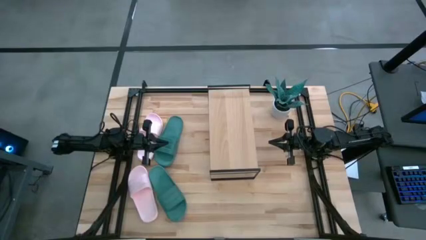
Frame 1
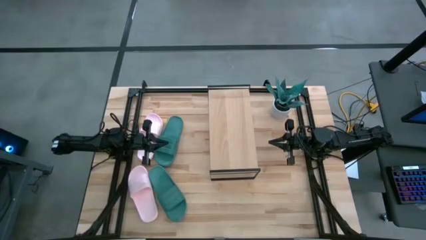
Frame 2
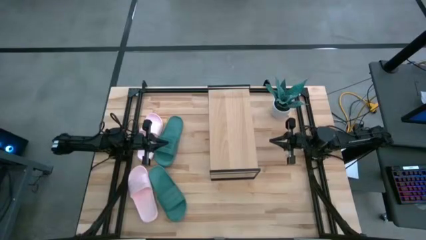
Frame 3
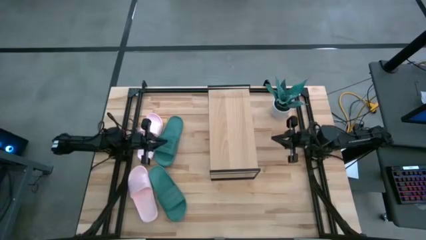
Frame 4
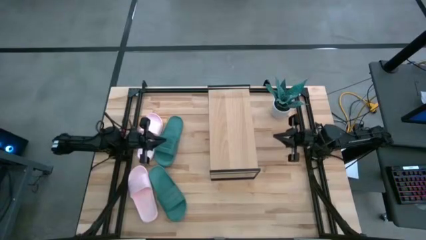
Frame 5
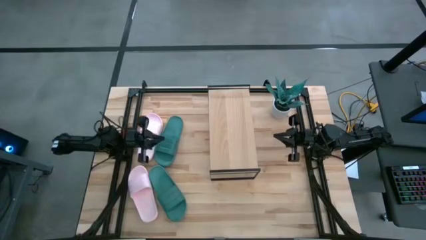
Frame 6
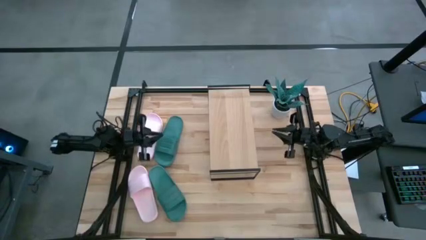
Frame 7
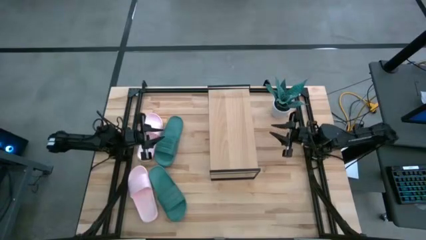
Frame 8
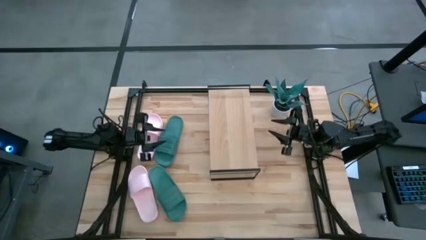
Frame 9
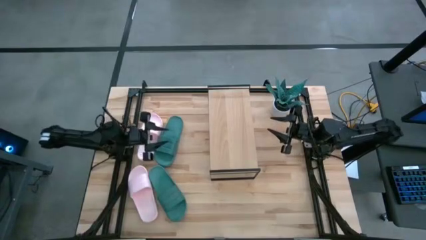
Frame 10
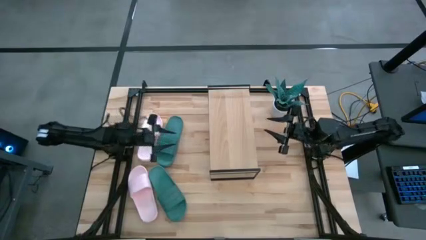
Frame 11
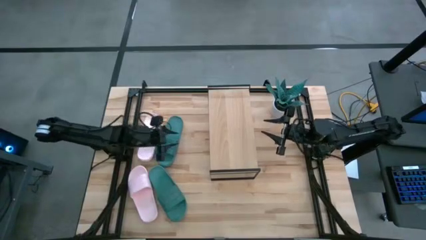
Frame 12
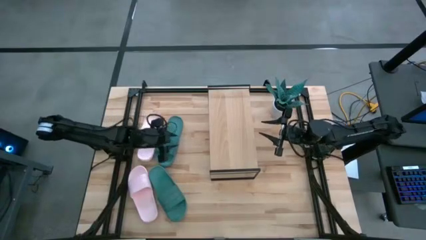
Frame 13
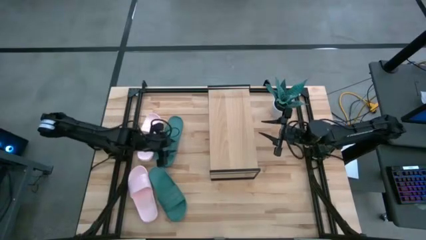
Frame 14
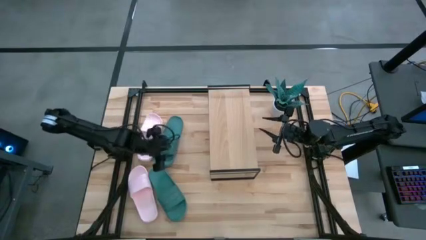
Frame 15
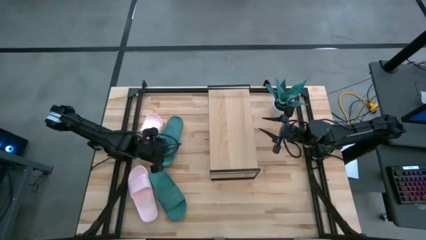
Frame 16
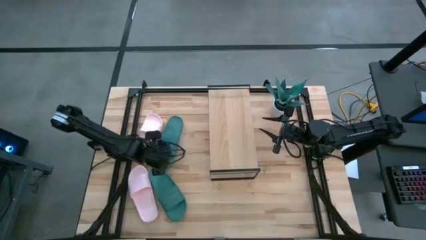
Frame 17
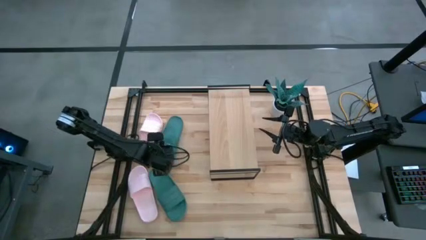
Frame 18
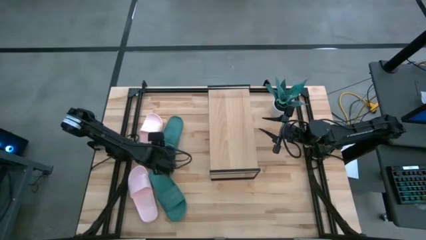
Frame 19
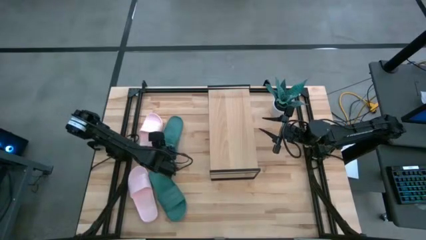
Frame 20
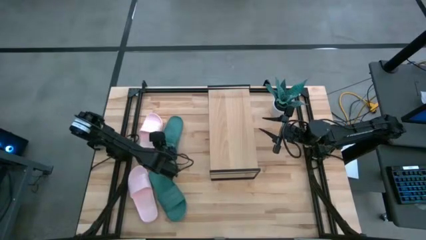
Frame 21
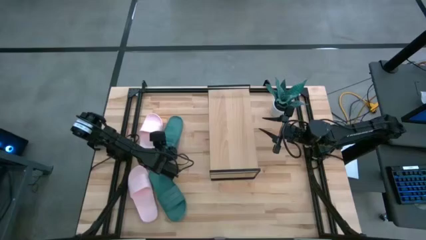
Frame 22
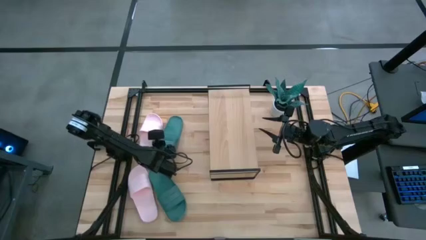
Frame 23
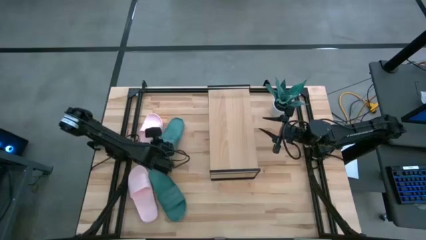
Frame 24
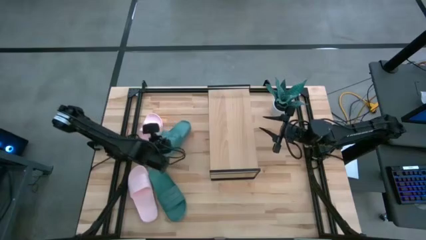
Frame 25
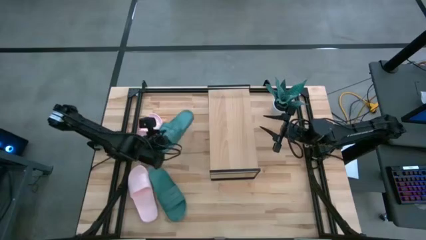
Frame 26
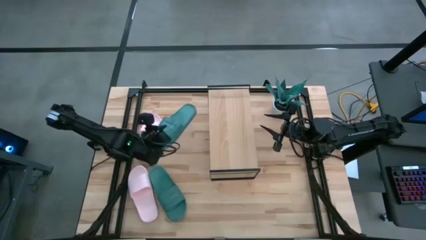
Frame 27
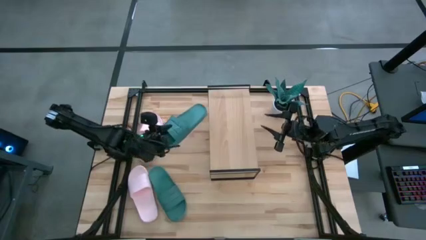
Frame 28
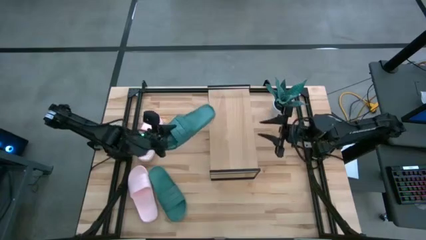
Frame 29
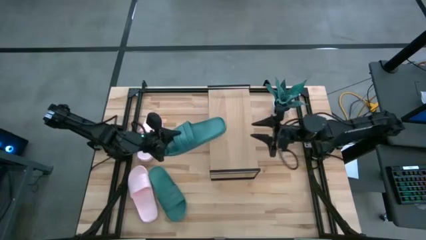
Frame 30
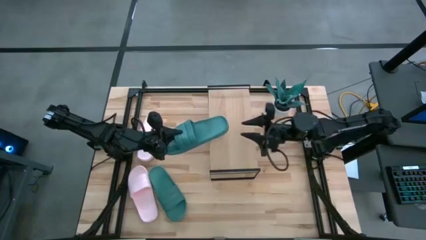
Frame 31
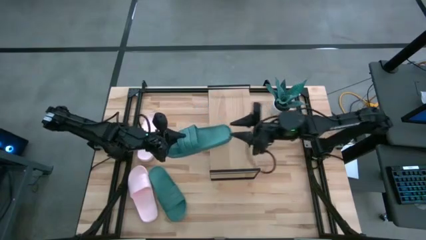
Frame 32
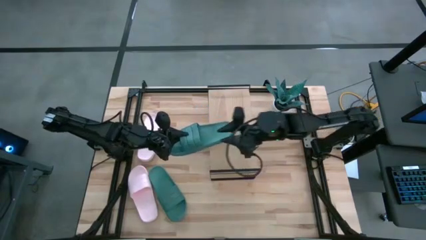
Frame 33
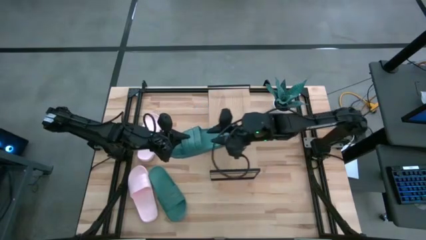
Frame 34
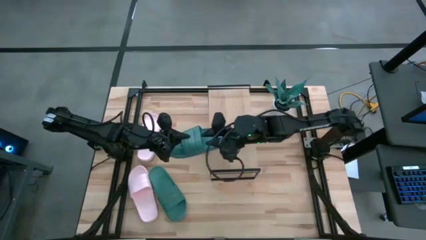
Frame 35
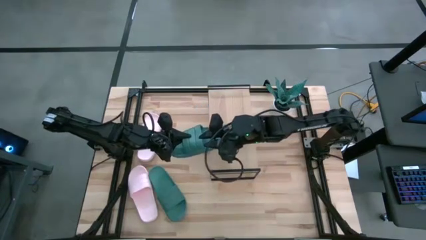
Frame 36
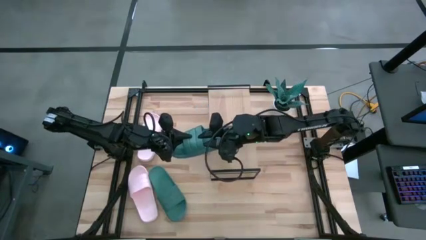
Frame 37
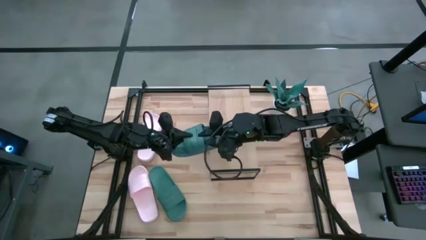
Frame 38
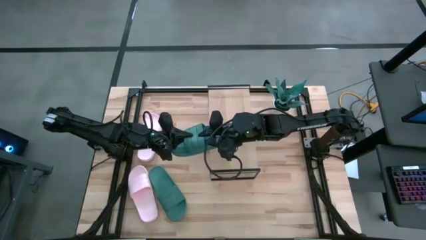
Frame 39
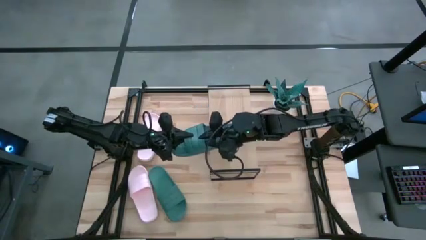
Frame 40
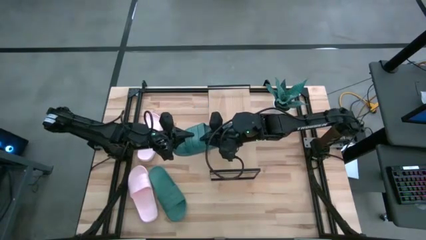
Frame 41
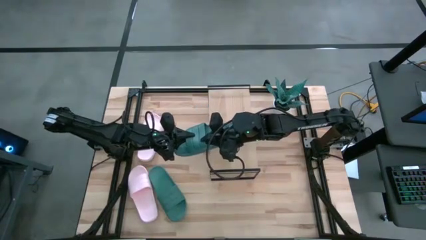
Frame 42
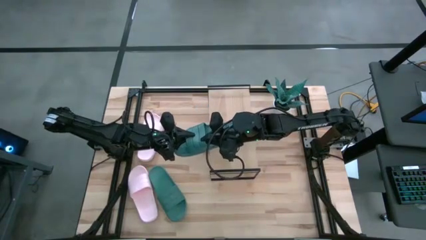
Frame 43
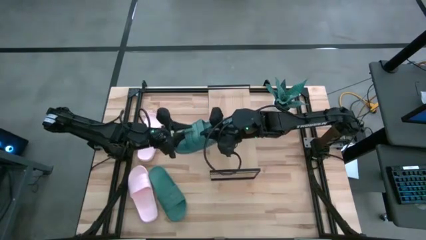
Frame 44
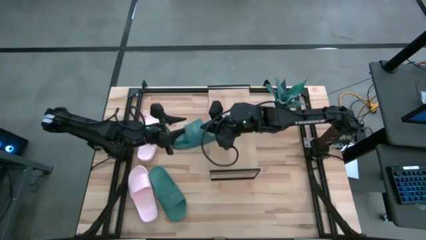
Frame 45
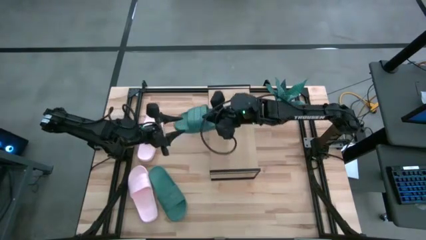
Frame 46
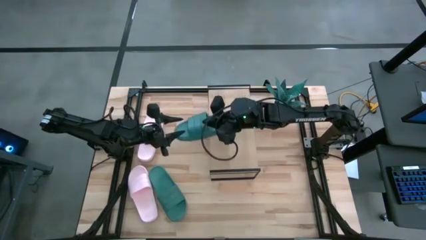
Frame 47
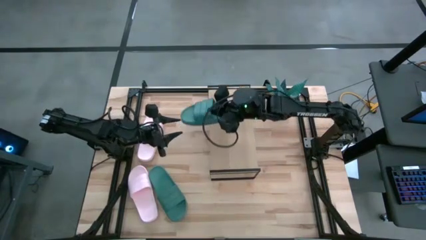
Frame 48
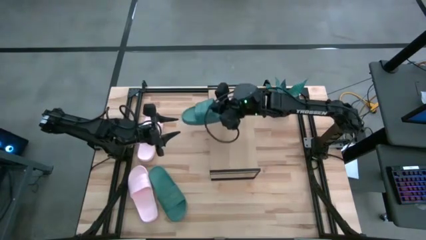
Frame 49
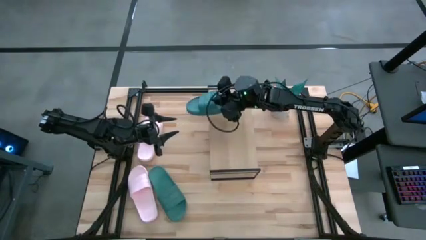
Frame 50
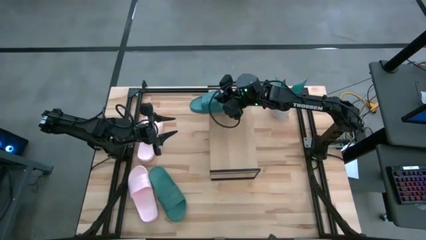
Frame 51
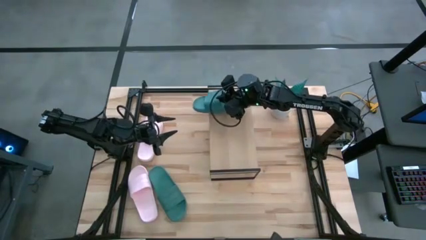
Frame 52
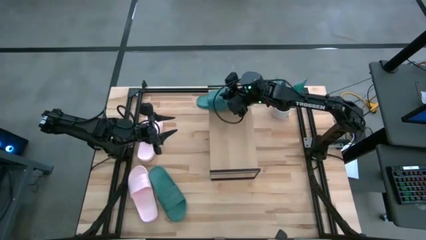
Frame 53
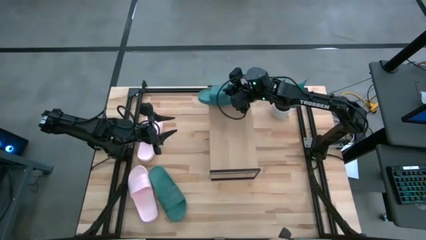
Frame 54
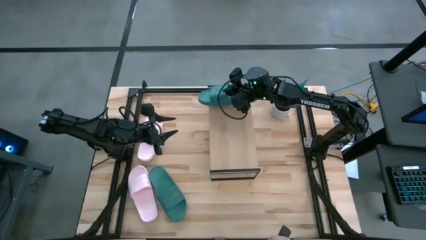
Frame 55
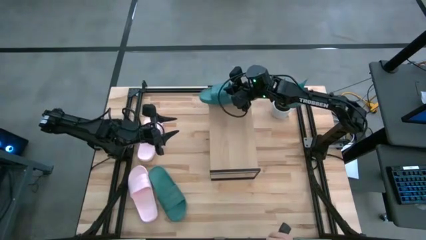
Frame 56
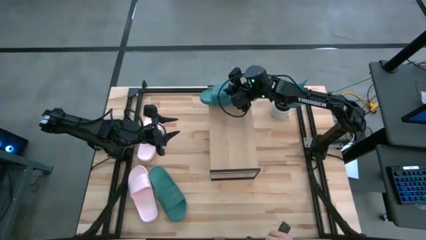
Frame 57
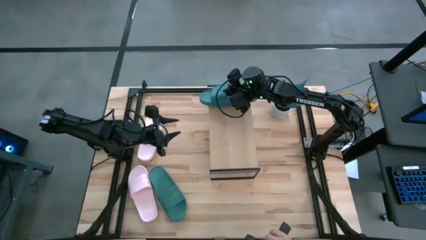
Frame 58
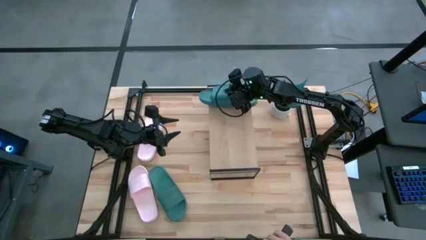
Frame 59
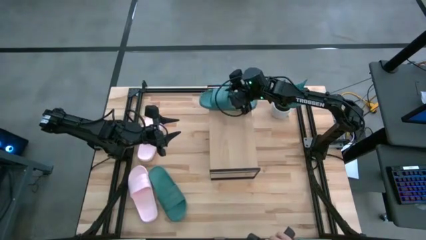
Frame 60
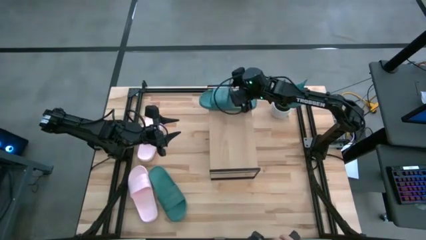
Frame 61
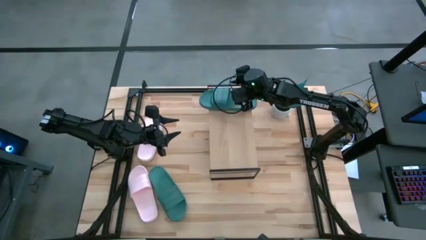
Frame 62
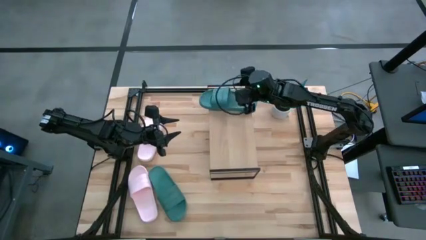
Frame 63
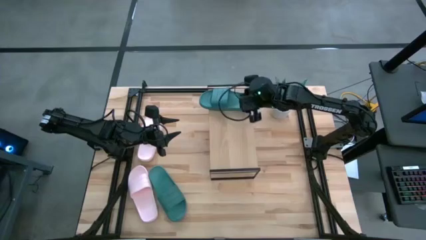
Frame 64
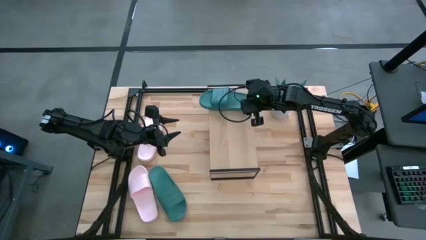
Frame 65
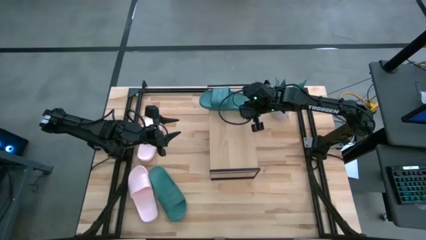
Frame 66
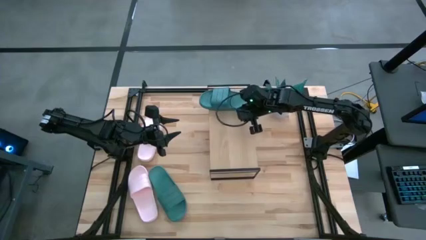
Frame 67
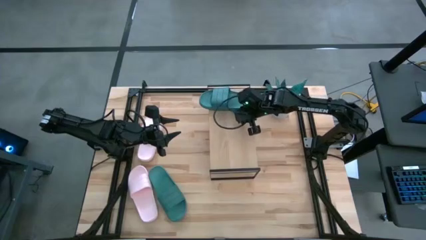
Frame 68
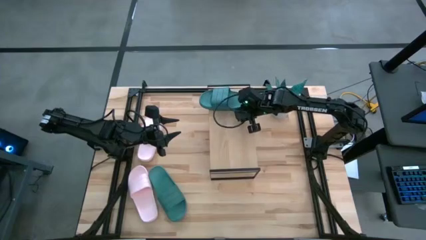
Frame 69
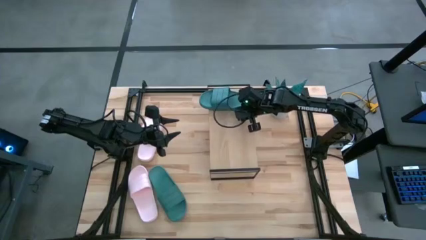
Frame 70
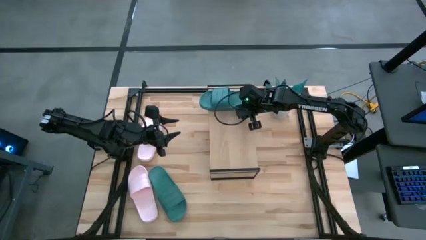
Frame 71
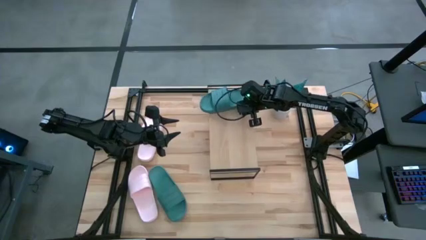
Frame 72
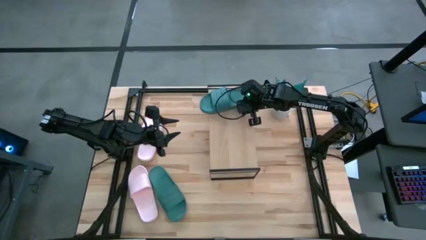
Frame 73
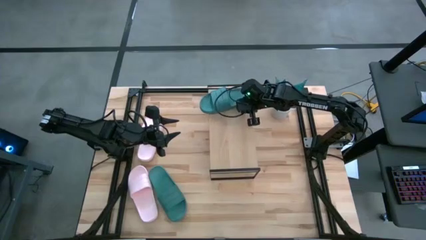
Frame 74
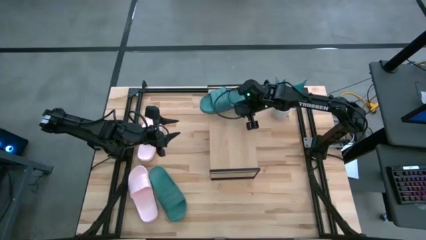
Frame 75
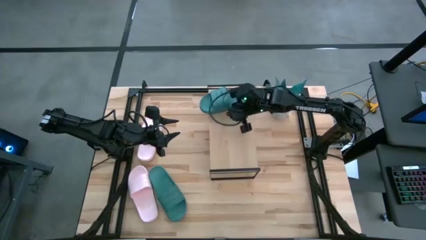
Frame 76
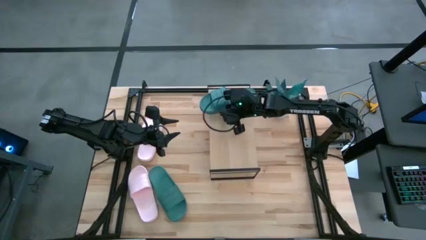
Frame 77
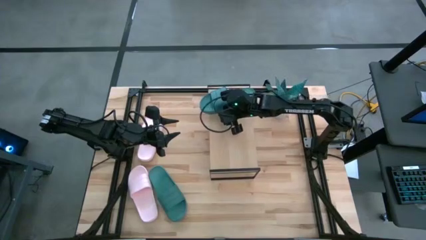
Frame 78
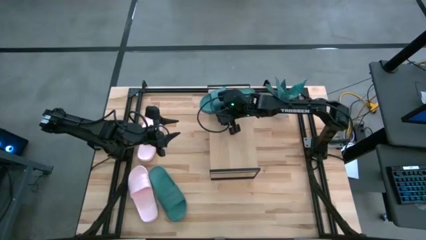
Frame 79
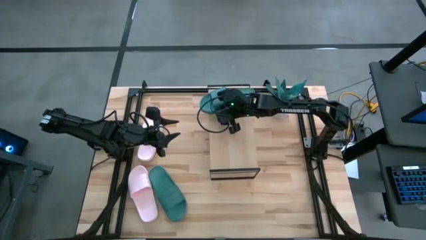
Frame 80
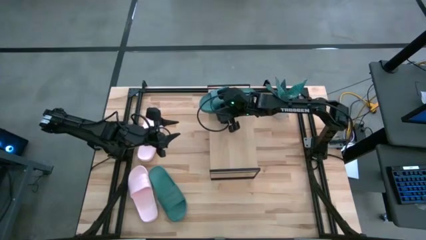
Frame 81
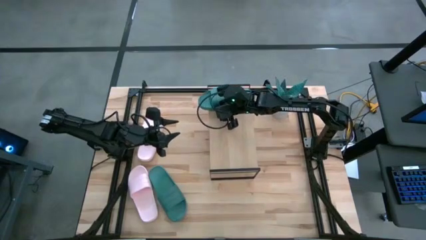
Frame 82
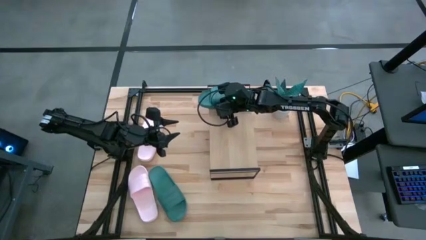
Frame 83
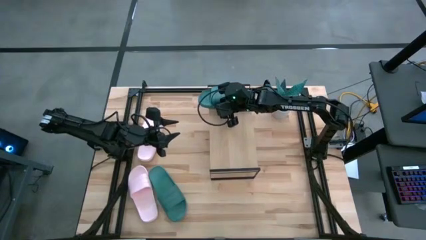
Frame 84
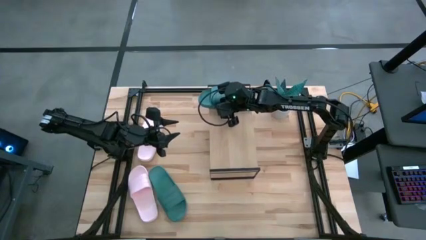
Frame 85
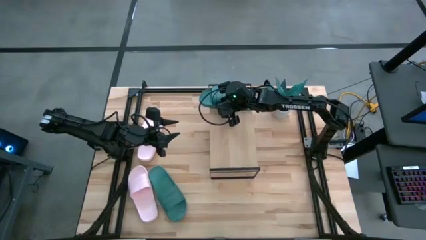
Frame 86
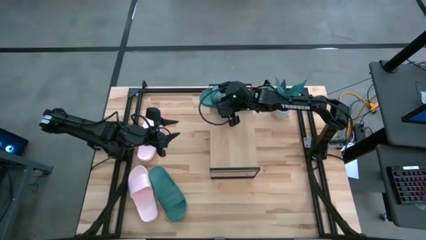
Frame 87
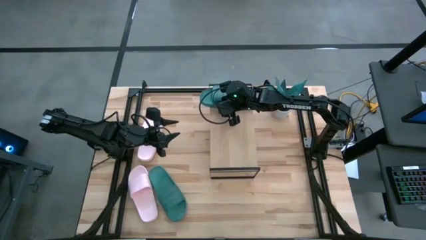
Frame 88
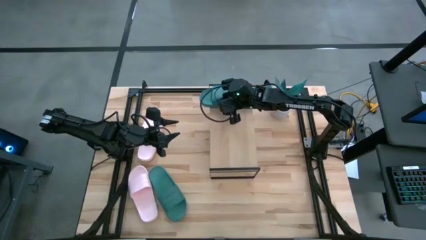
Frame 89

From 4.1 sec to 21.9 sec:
Task: Pick and place slides into the shelf
Put the right green slipper on the shelf
